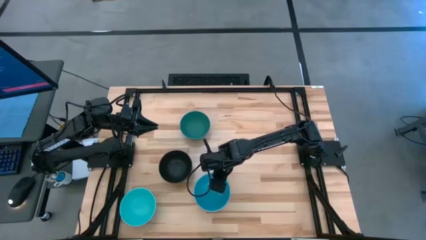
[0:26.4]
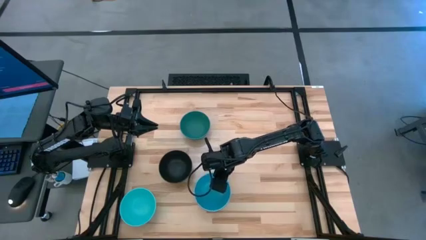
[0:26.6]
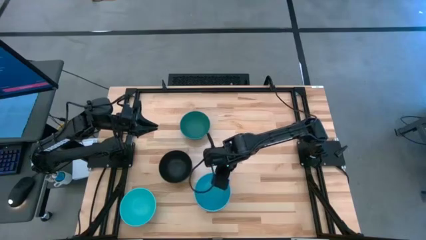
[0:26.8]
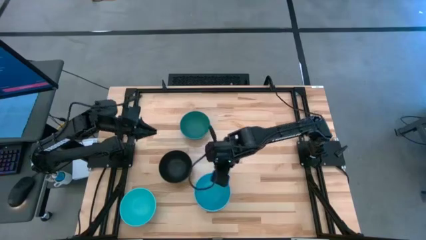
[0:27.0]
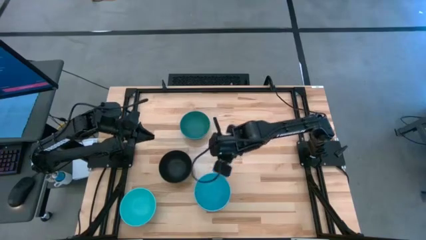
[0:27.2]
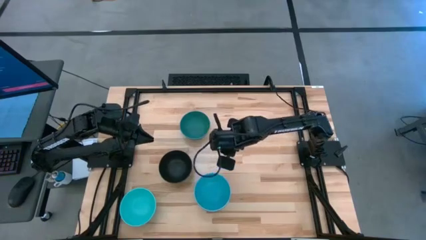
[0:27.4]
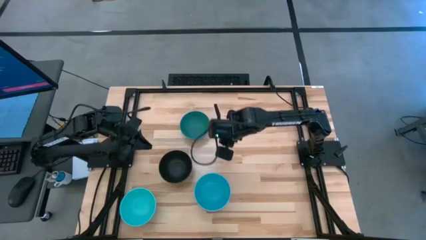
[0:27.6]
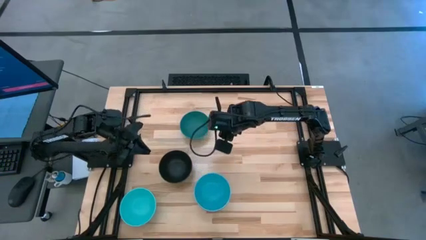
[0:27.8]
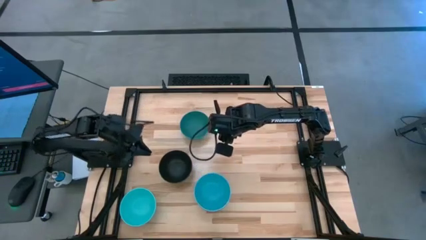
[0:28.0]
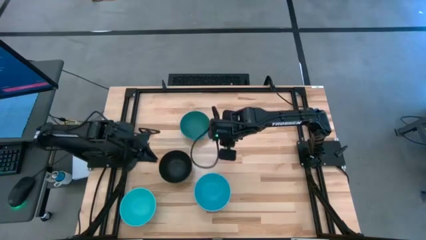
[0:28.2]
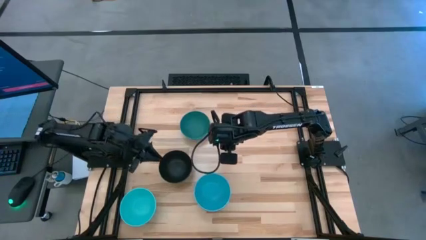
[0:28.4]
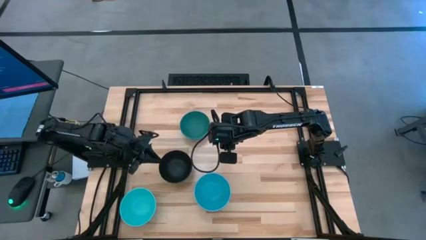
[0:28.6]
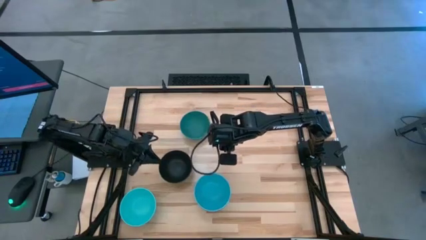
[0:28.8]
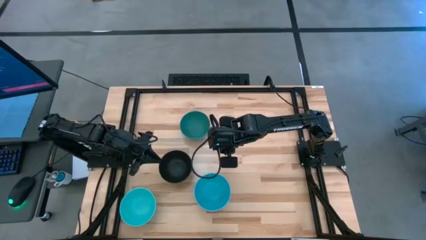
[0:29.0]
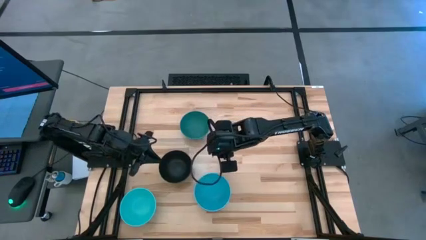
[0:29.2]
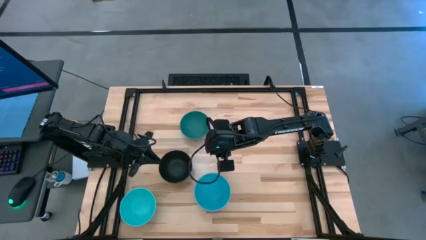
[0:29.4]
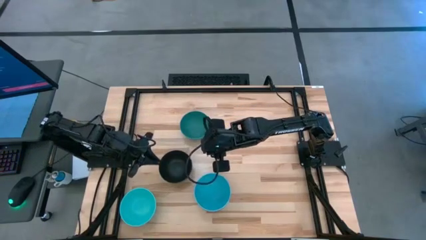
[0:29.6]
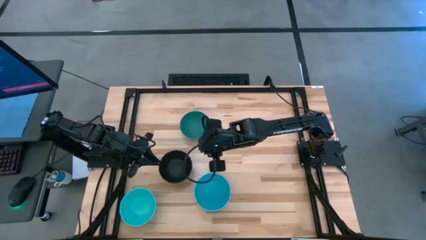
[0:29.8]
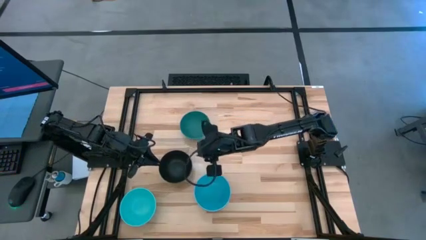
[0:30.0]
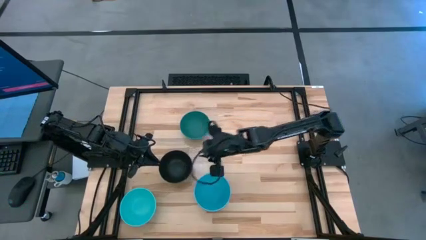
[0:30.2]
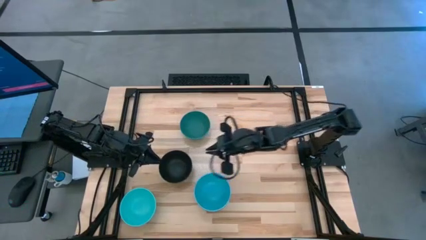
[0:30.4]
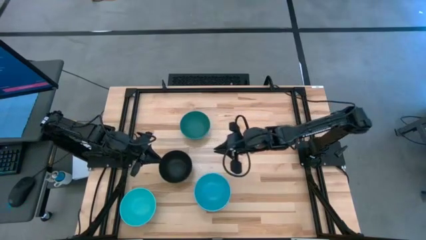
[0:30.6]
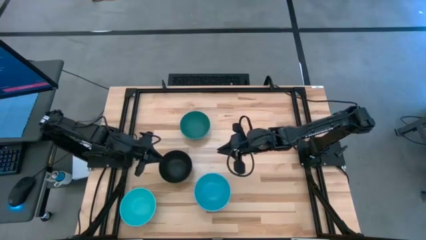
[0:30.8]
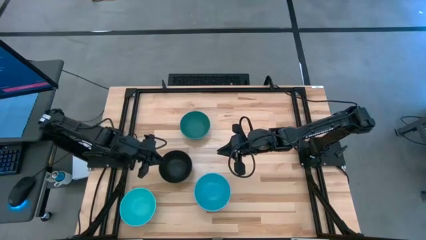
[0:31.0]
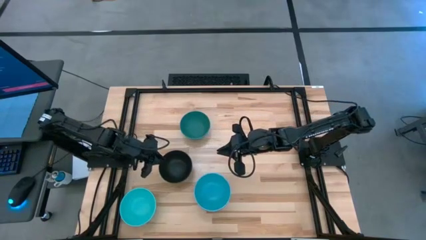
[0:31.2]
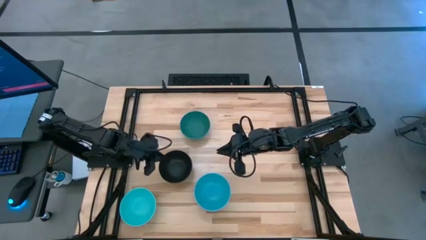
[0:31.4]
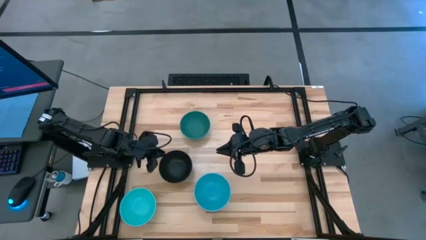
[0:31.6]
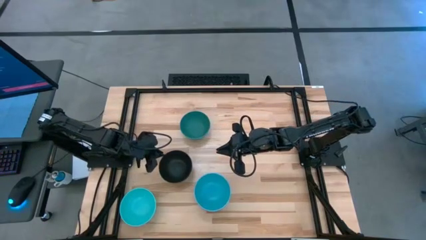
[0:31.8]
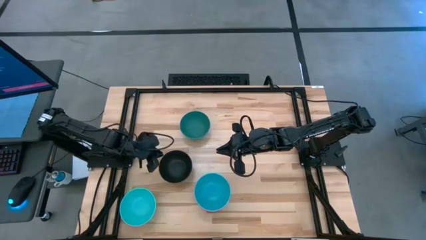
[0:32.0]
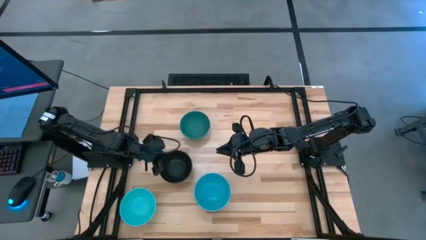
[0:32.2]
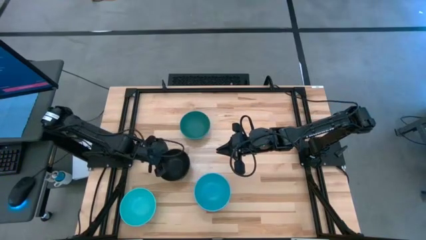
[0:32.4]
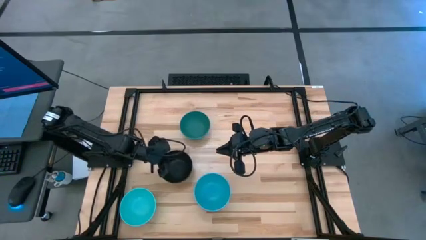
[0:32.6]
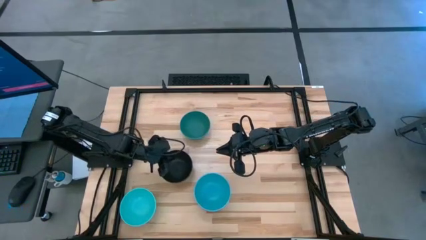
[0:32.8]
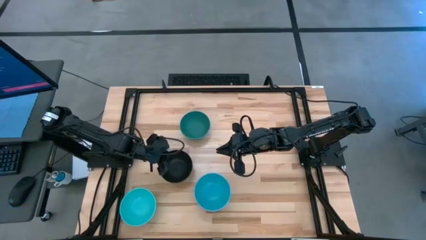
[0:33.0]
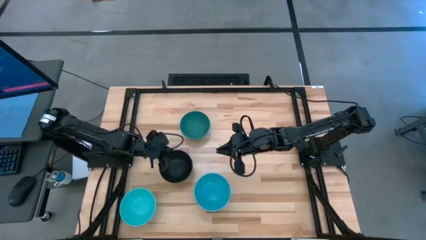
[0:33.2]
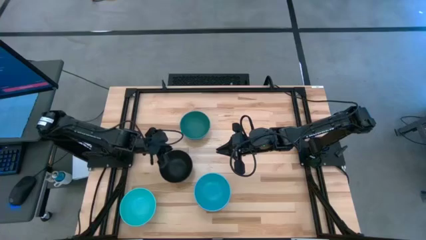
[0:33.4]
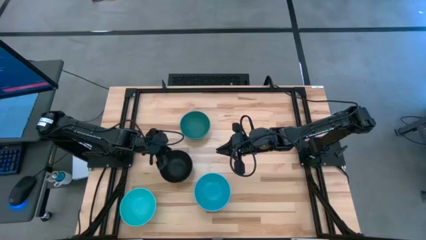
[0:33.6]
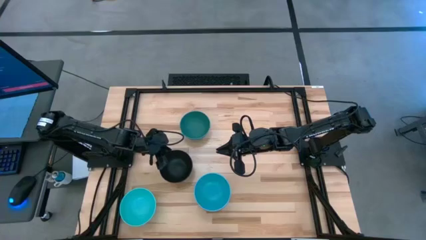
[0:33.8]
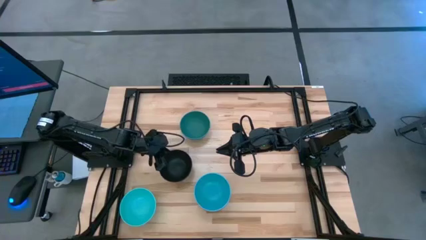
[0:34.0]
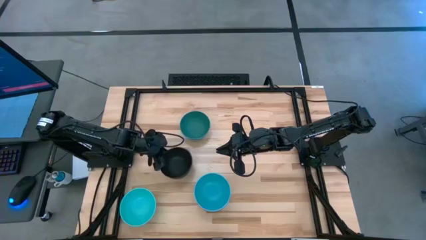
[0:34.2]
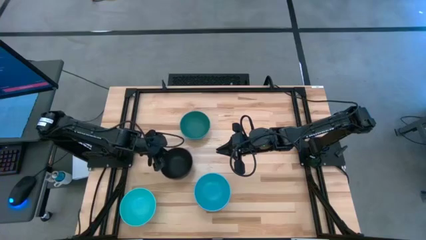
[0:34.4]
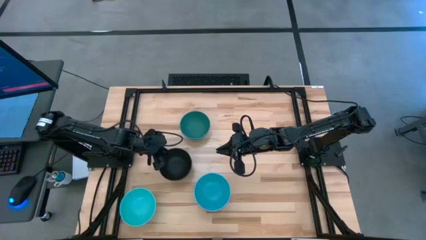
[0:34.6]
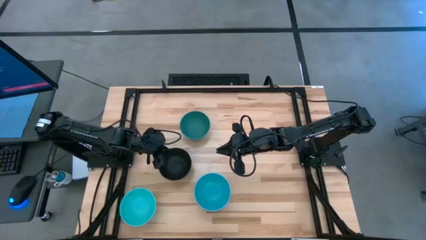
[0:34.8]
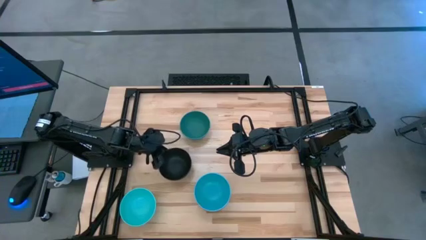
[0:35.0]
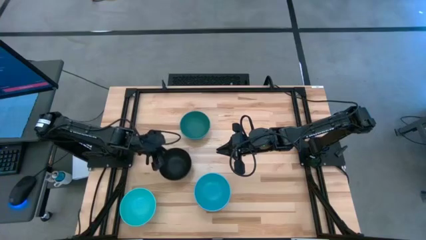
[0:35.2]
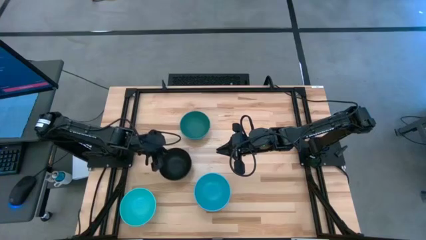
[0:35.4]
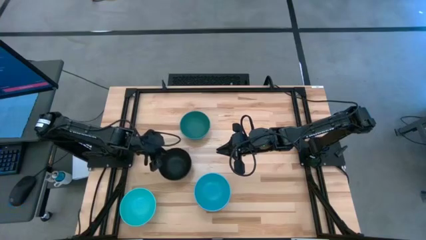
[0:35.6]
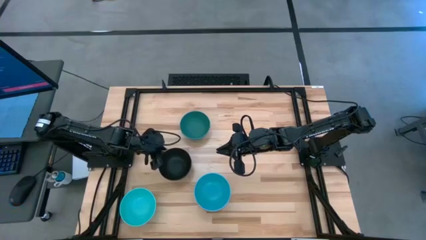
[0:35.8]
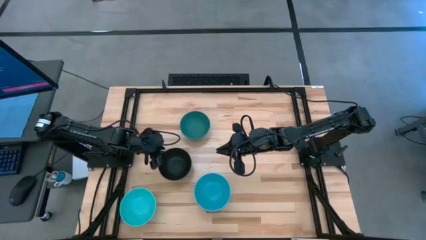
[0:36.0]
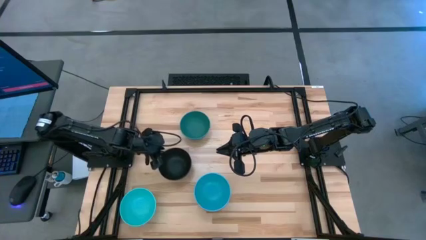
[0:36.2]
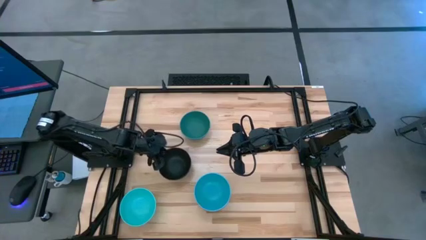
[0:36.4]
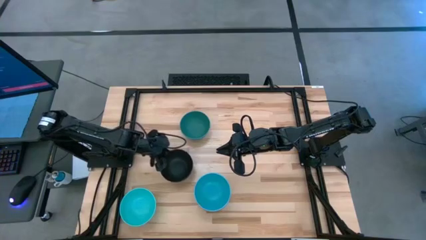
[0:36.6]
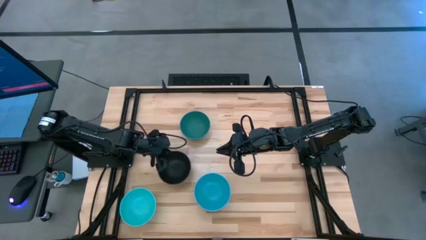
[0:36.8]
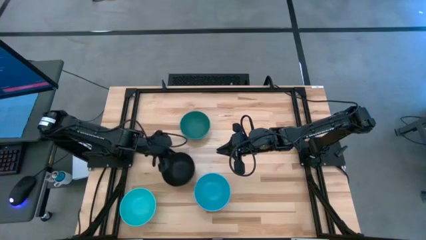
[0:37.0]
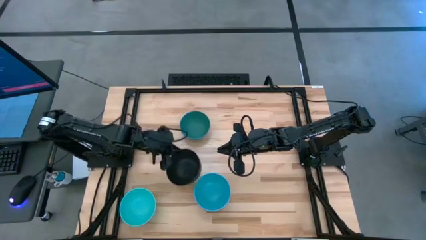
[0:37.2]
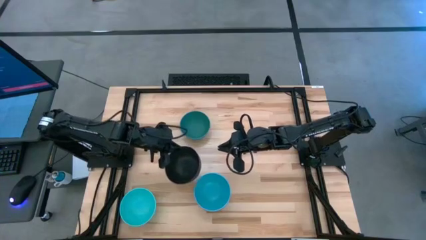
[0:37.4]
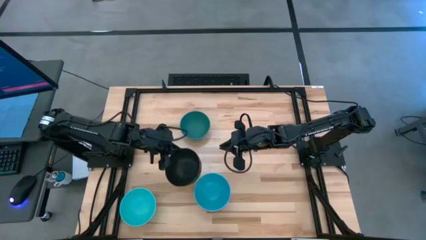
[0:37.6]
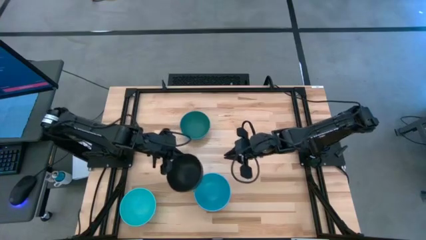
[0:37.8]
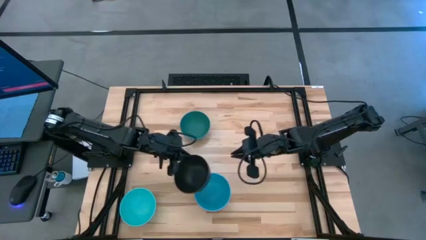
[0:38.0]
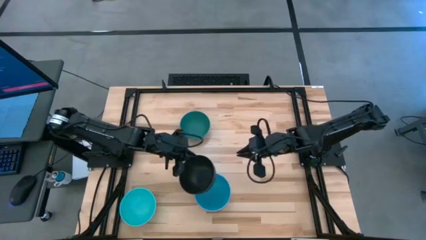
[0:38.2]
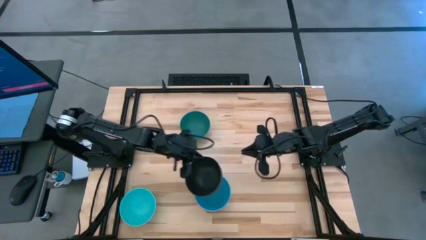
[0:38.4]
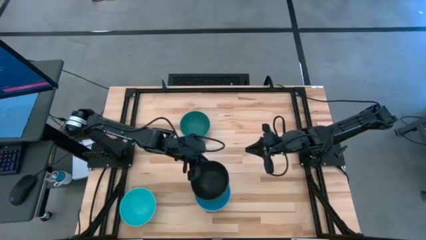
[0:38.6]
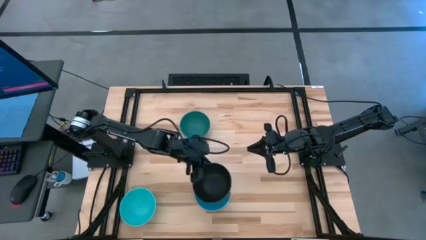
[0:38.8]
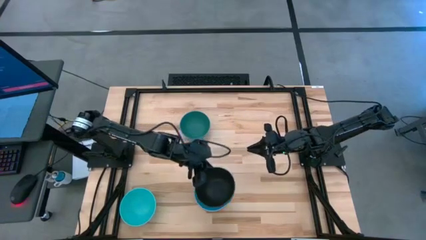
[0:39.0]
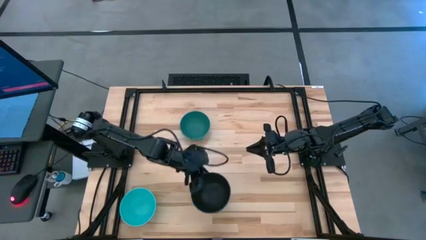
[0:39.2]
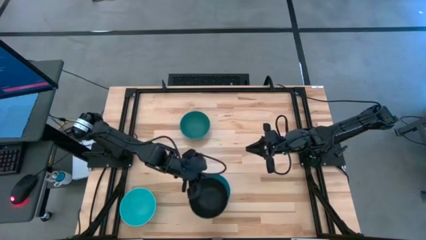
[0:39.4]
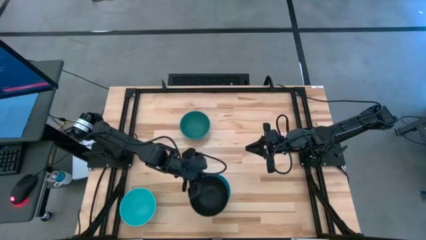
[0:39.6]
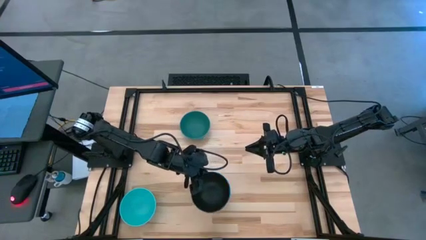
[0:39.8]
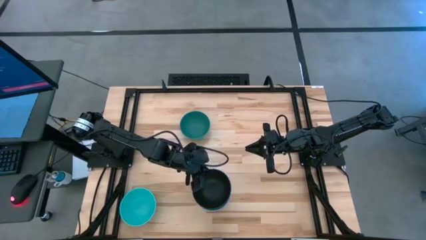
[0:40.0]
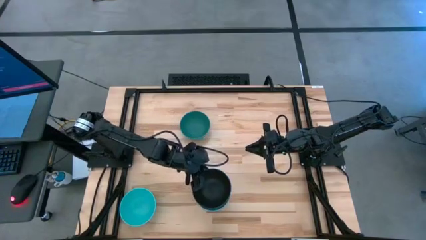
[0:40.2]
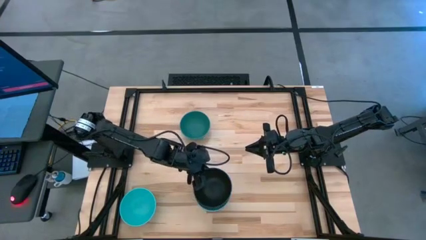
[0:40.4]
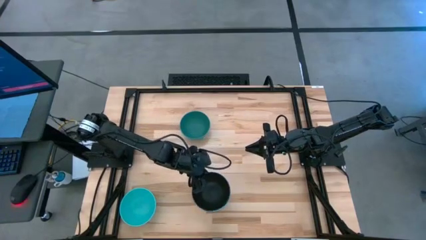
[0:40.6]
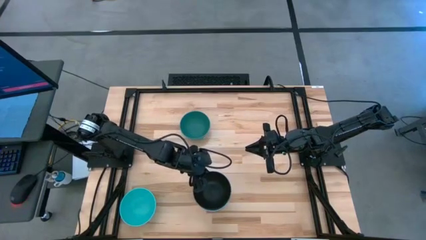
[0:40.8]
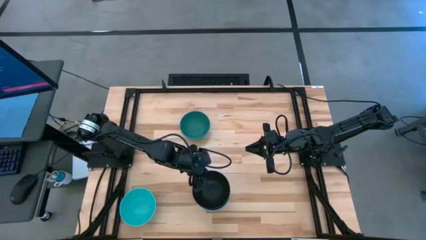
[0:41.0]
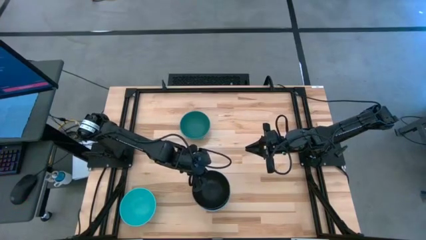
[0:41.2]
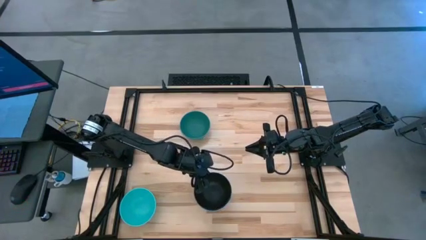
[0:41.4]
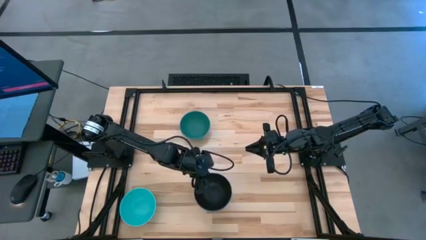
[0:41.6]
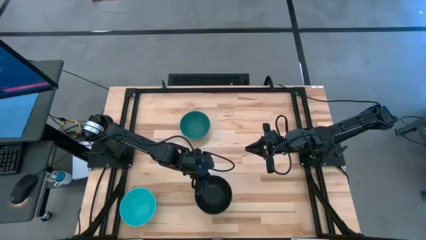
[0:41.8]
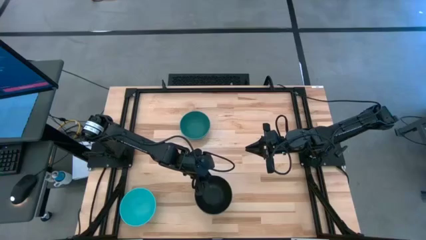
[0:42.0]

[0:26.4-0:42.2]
Task: Nest bowls inside each other
Stack the black bowl on top of the blue bowl
